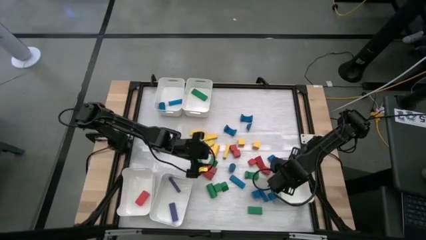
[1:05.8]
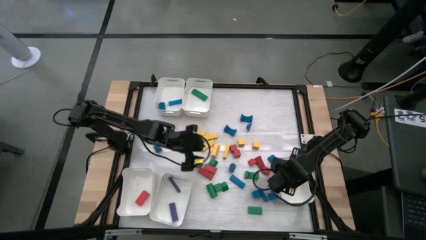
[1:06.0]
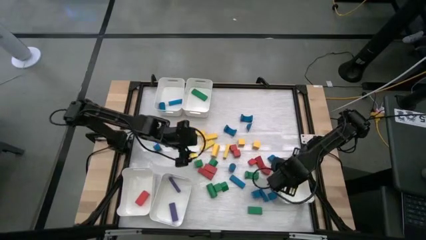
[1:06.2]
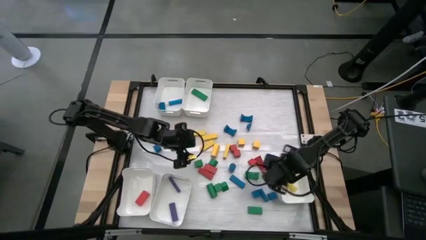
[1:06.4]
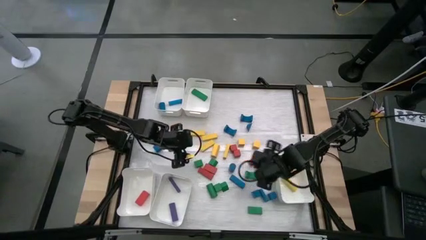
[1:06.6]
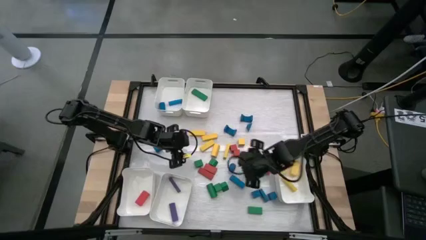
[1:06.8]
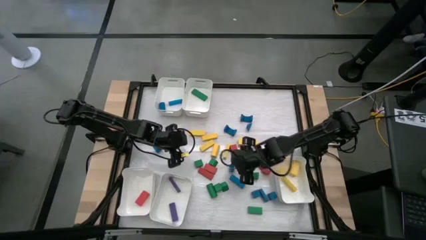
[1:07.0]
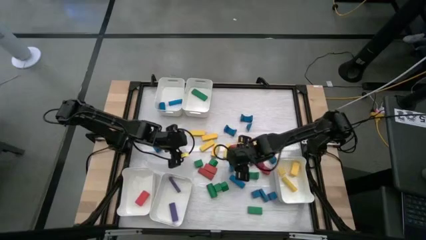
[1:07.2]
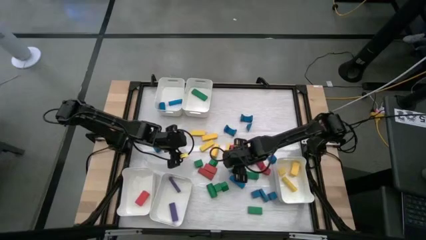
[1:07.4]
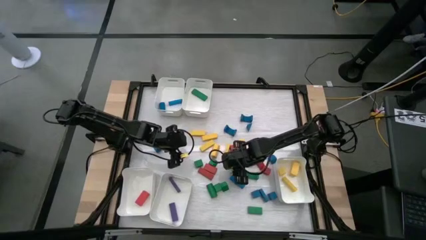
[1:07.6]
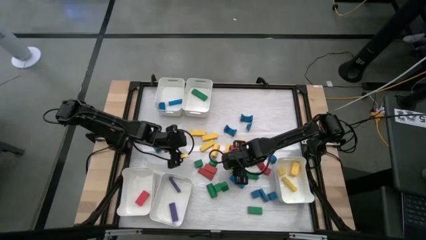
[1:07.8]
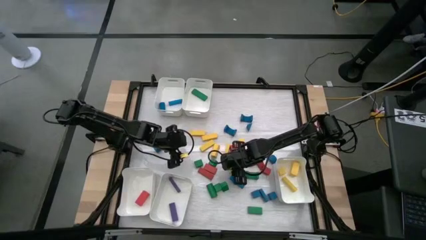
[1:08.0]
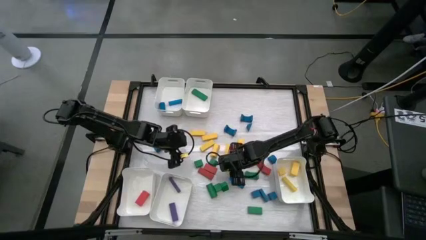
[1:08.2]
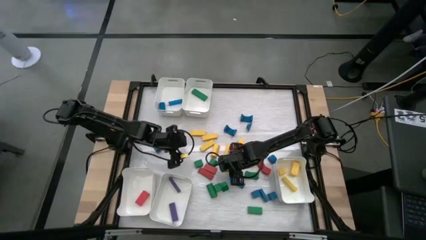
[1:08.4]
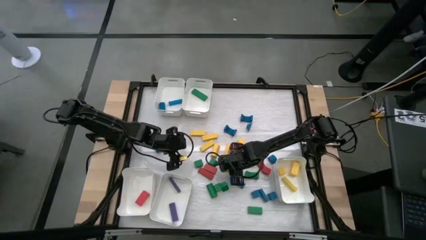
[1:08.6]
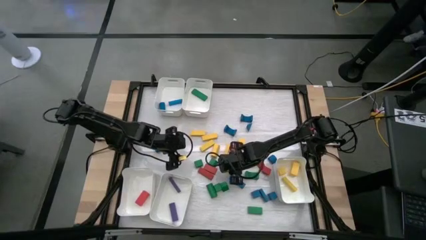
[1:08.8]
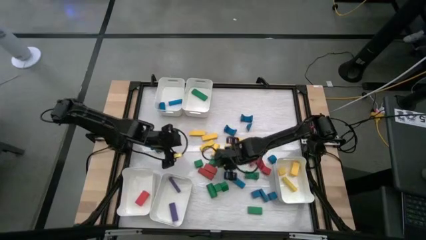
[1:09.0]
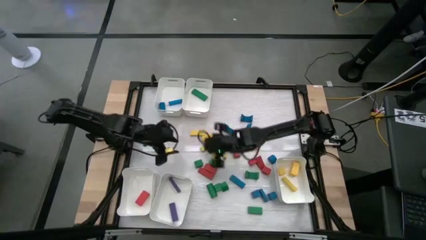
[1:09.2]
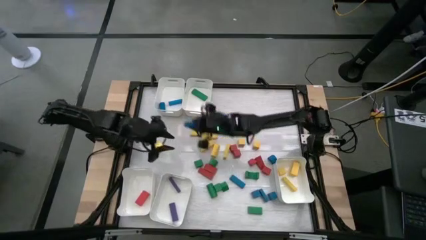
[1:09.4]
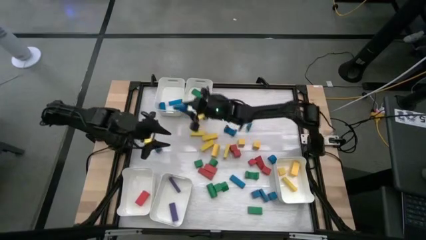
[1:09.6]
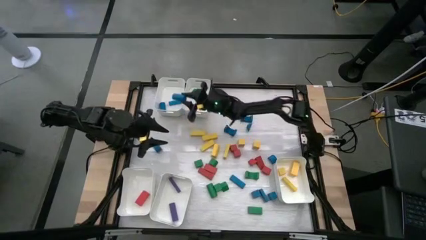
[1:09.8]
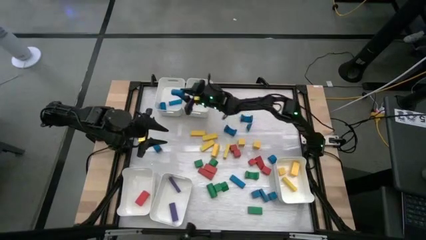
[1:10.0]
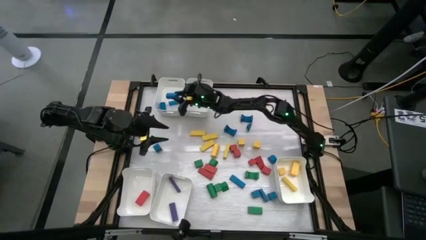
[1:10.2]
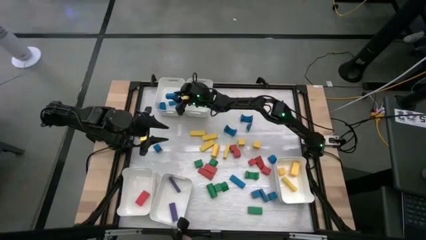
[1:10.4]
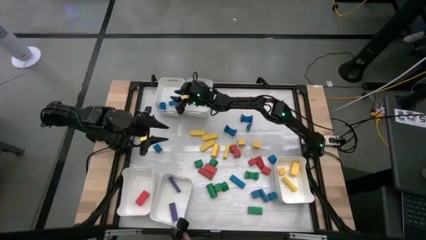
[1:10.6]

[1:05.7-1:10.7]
Task: Sort blocks
Put the blue block into the top left white bin

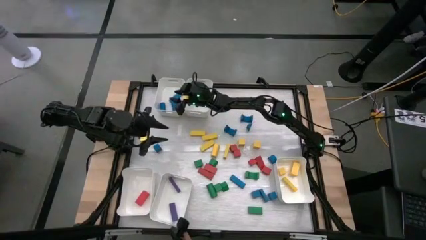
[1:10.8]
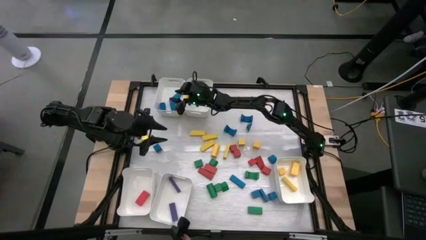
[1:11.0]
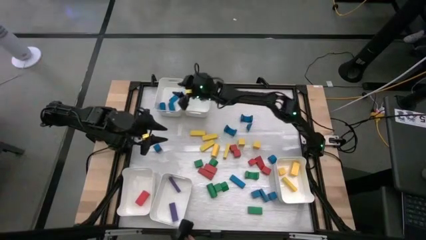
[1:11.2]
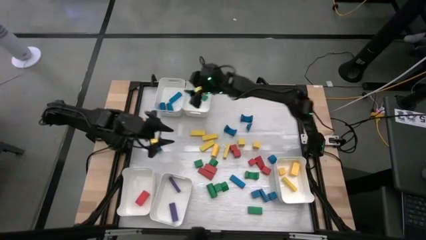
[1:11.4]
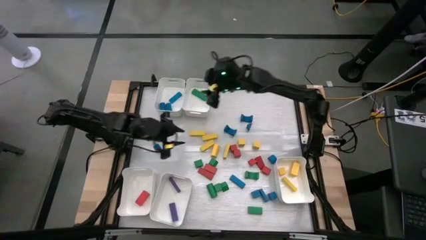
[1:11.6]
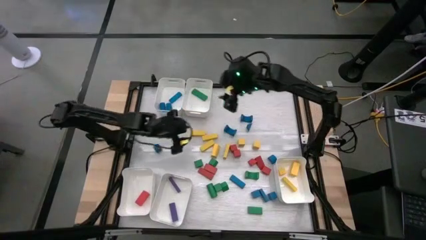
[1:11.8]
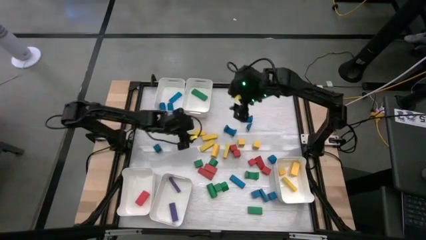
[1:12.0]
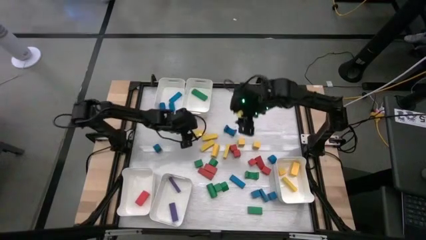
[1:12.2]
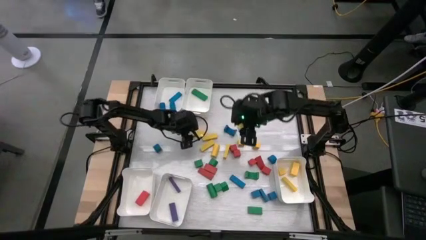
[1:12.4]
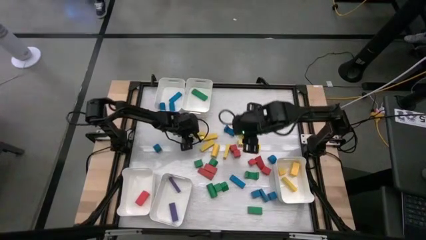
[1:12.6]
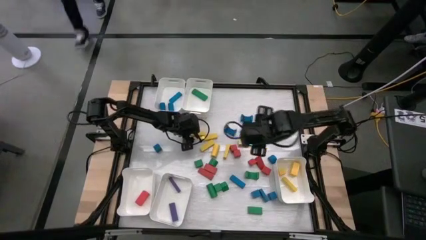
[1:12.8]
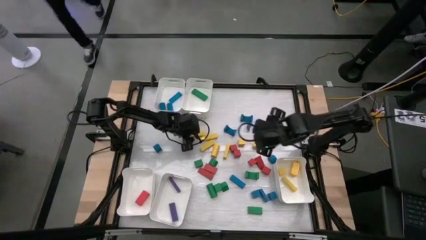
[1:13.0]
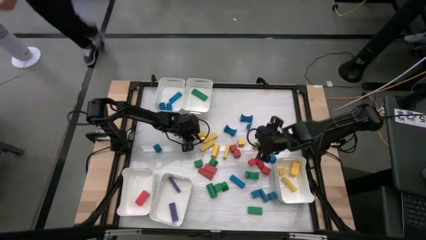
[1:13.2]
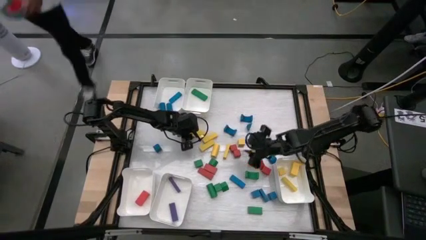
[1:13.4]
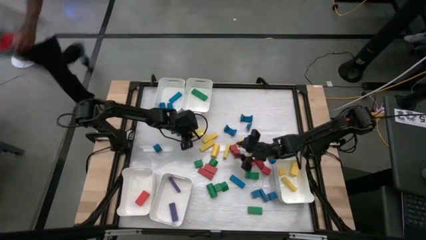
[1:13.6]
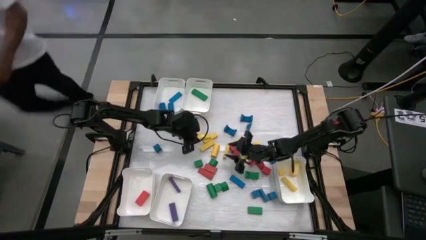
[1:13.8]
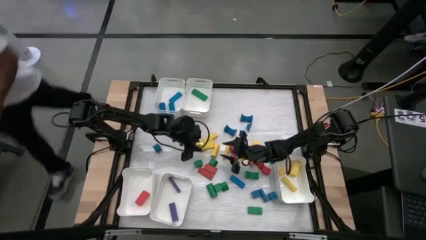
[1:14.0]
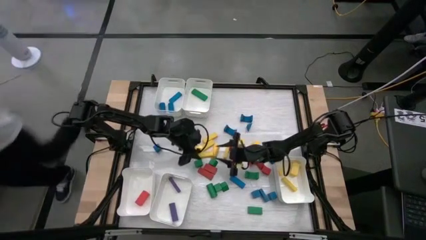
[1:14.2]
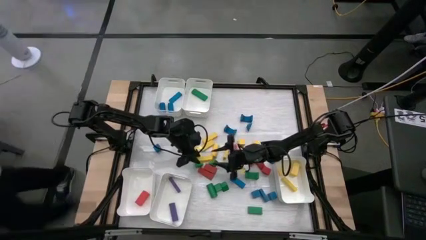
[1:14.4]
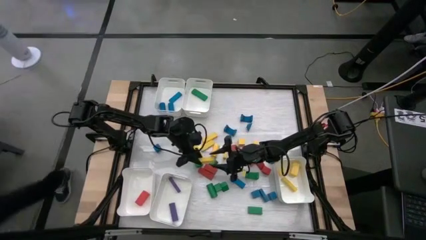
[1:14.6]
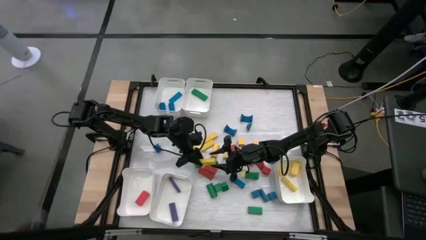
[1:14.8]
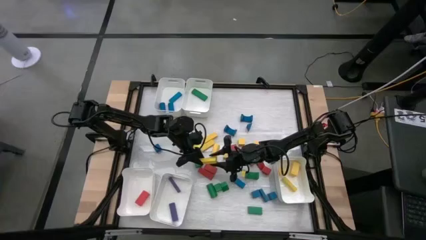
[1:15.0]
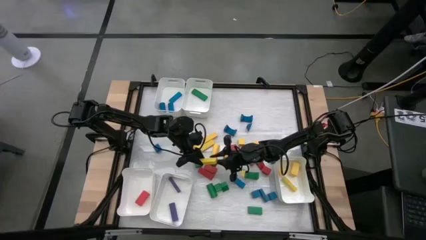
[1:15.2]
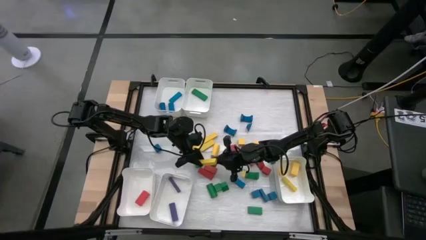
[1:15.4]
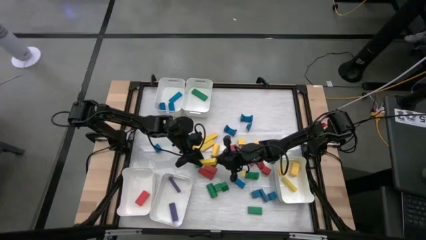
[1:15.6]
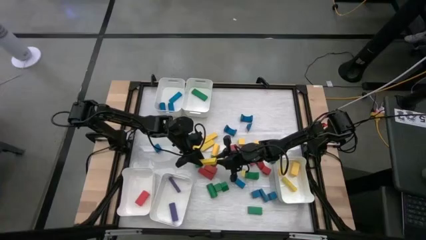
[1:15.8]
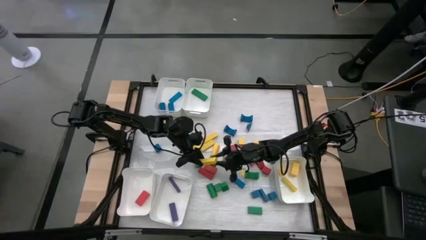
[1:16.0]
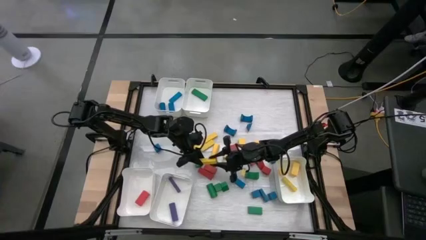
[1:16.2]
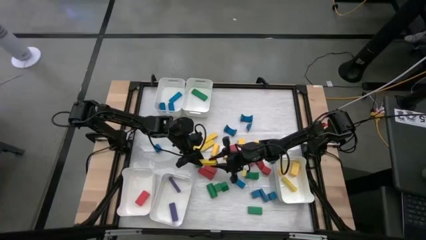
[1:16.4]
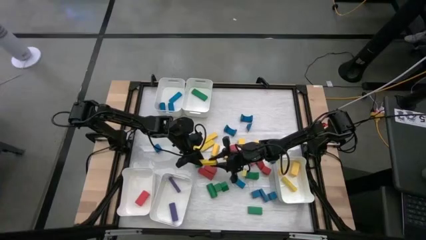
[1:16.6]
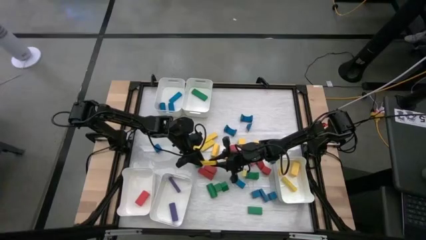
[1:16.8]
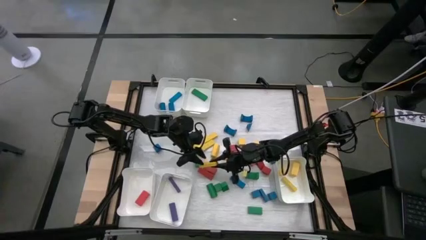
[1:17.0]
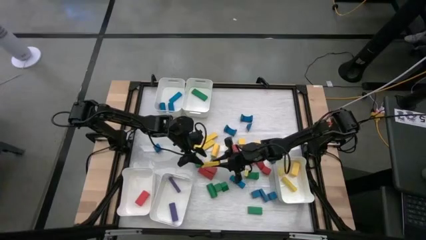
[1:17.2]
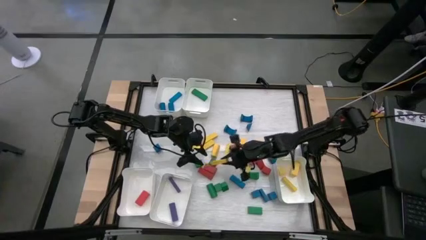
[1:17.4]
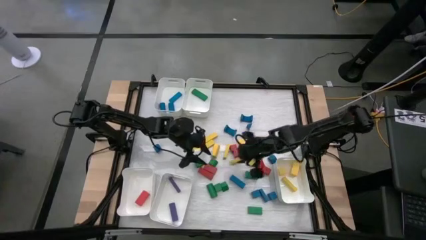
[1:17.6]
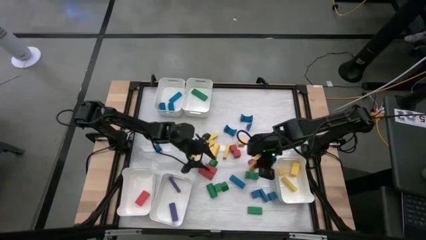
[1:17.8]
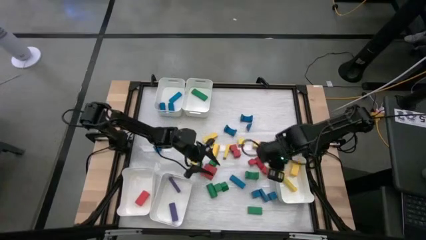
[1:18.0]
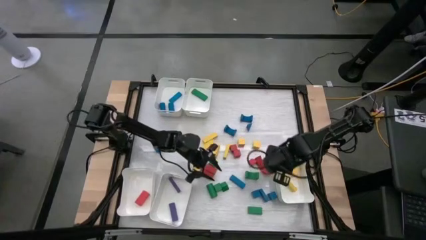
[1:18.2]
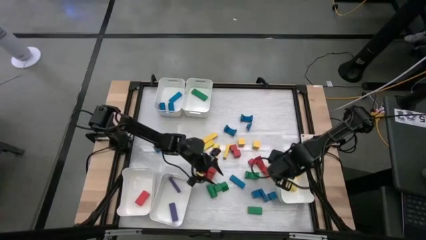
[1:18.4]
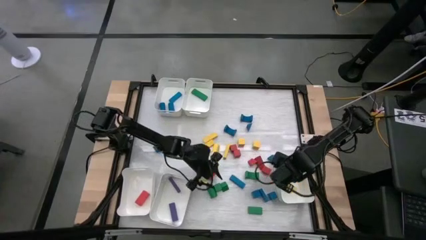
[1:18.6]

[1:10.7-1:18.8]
Put the yellow block into the bottom right white bin

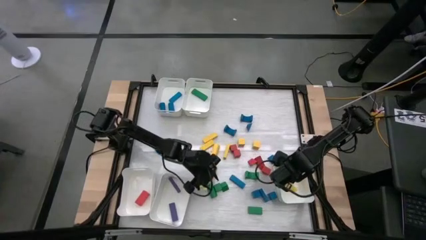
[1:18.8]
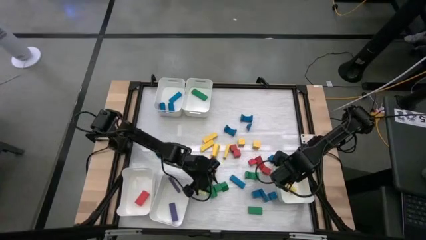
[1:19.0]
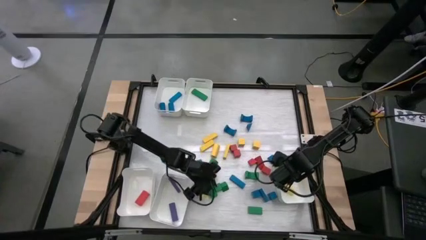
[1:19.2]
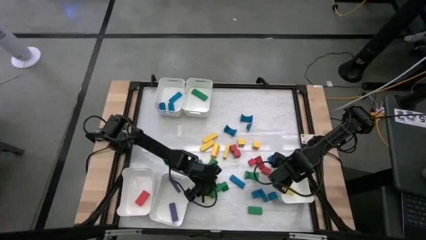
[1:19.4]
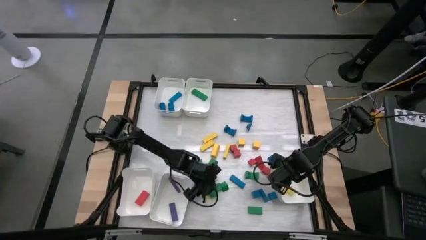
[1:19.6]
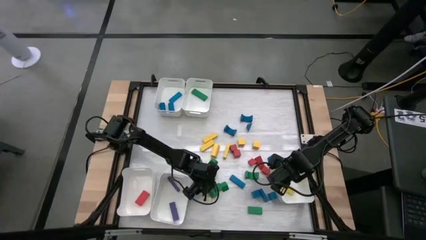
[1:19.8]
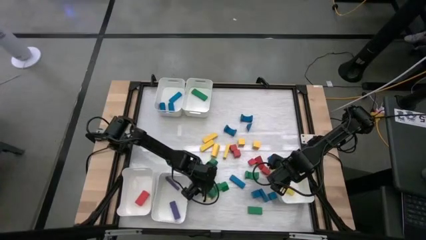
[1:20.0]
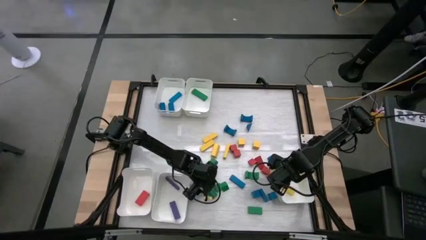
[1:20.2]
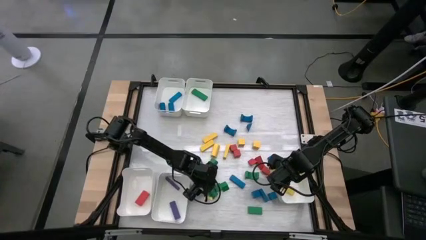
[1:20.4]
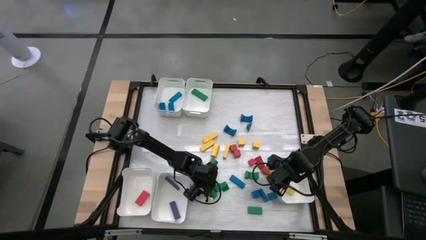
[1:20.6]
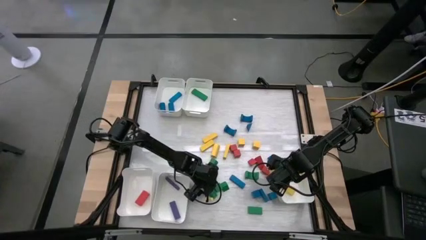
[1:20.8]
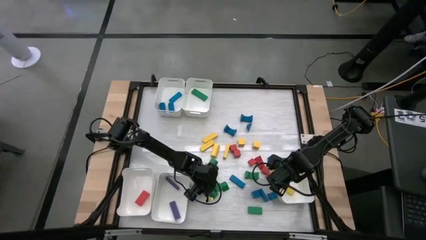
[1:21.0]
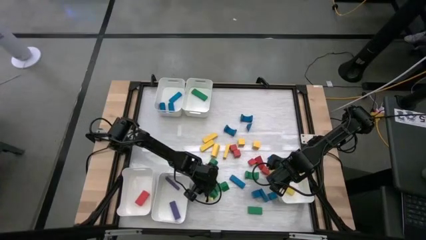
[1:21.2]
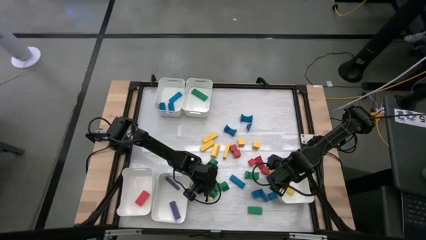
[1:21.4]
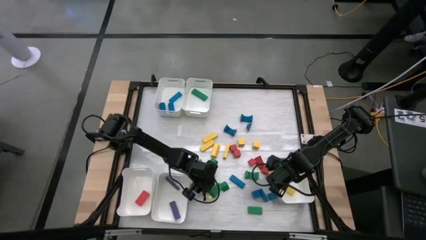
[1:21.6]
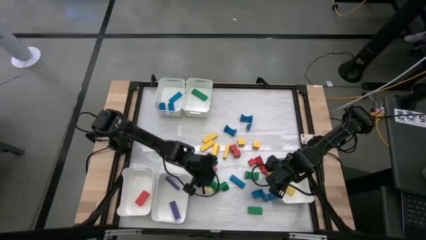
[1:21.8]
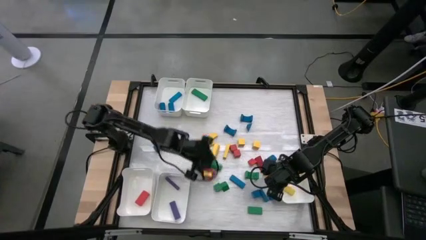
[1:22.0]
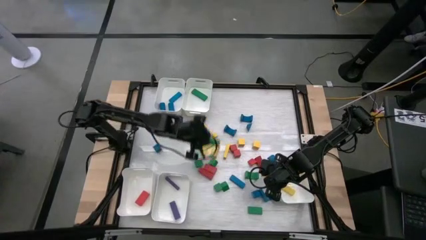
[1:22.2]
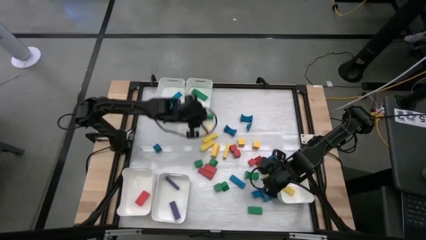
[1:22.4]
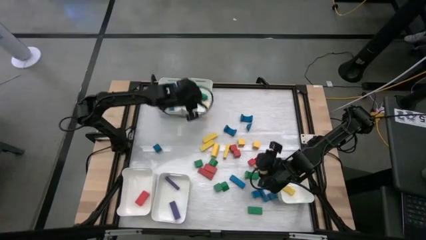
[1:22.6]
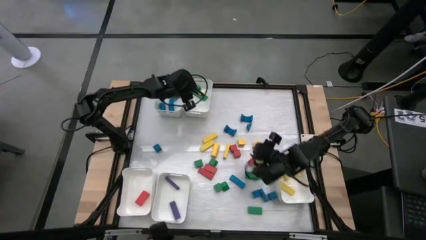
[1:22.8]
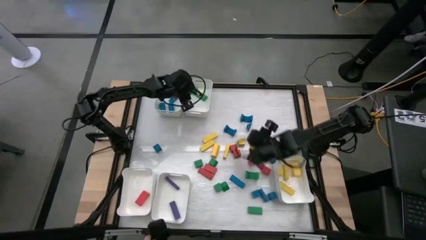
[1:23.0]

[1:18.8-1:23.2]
Put the green block into the top right white bin

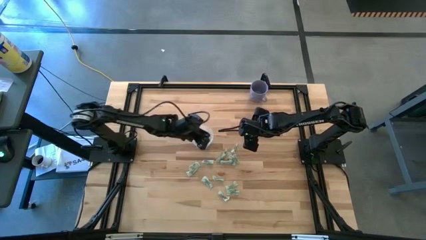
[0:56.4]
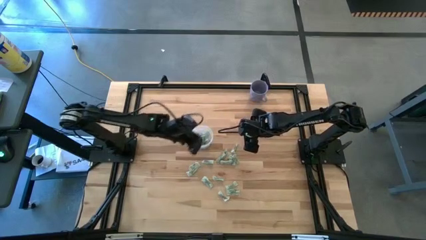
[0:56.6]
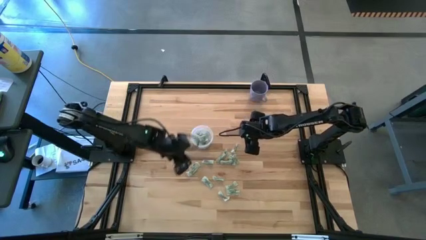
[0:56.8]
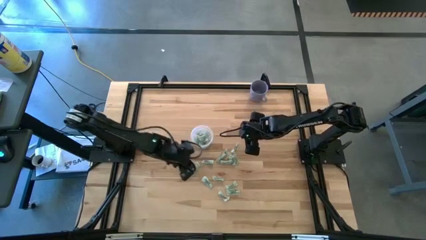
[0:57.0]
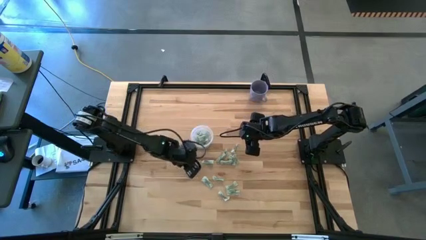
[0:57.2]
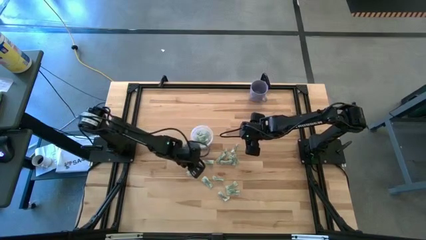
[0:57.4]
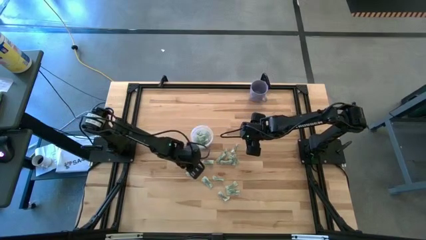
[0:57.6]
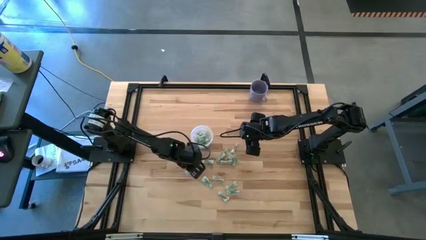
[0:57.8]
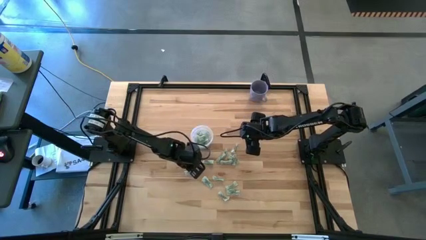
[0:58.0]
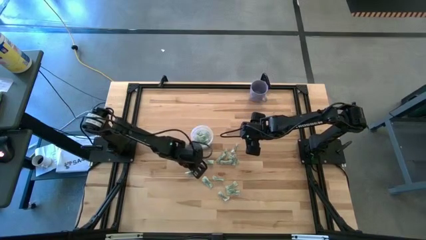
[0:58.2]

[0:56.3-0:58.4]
Task: Pick and place Stevia / Truvia into bins
Put the white stevia packet into the transparent container
